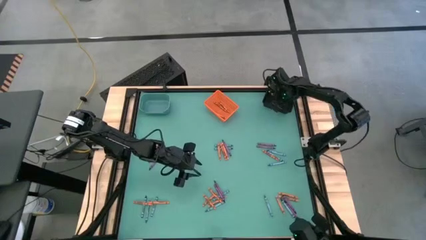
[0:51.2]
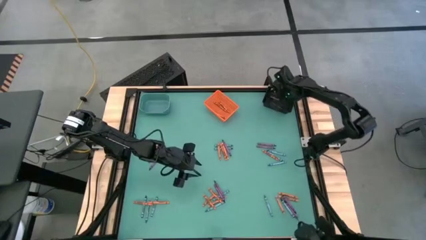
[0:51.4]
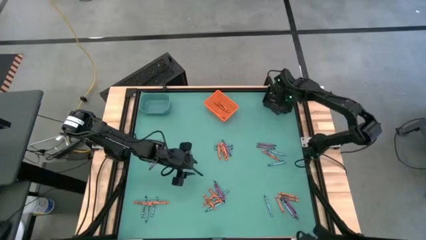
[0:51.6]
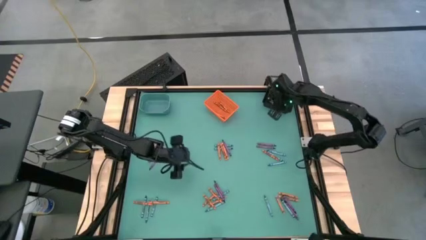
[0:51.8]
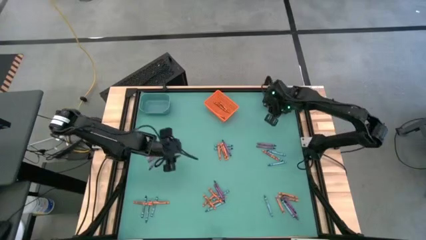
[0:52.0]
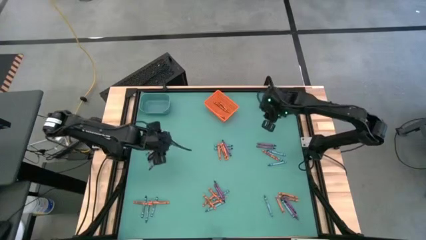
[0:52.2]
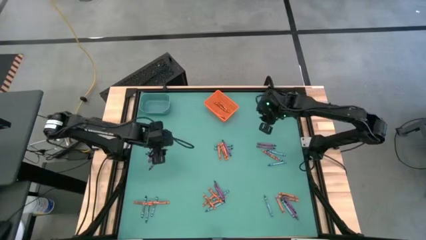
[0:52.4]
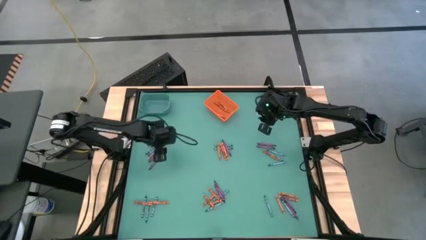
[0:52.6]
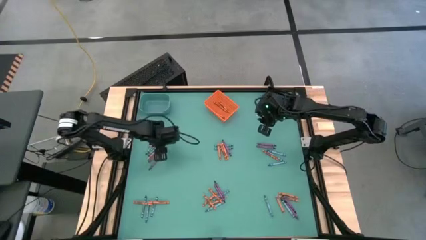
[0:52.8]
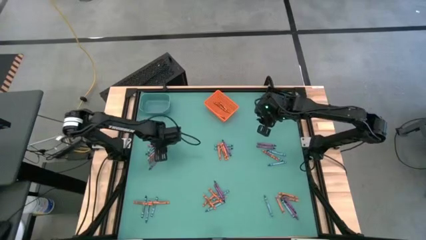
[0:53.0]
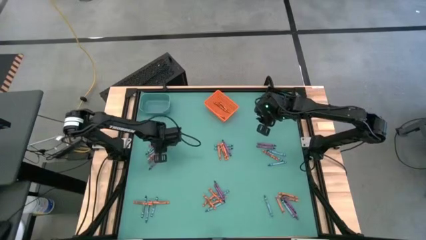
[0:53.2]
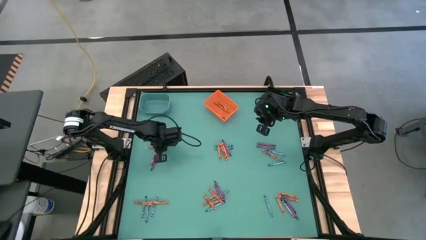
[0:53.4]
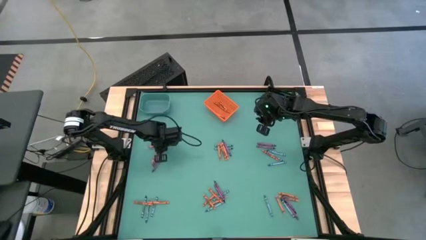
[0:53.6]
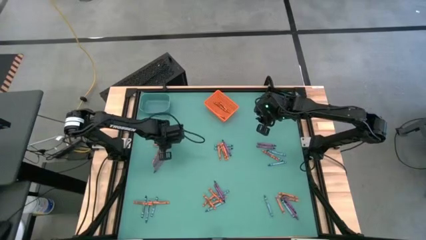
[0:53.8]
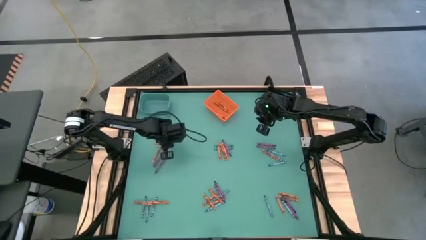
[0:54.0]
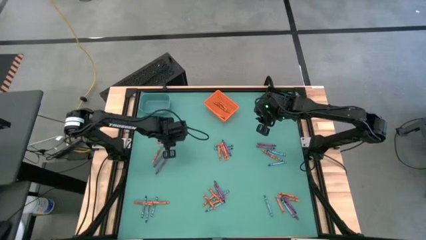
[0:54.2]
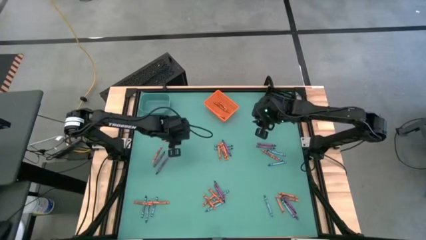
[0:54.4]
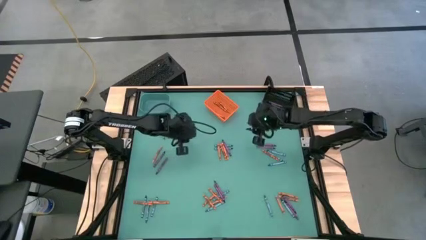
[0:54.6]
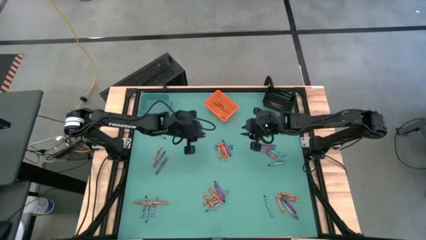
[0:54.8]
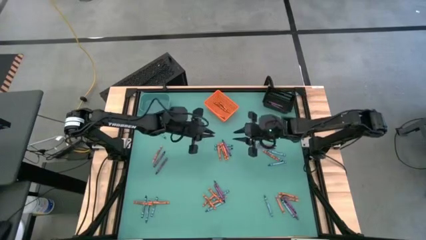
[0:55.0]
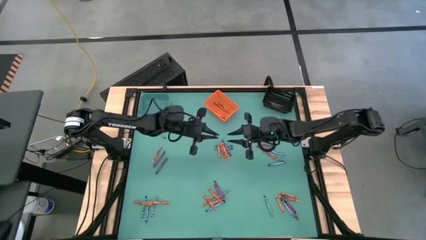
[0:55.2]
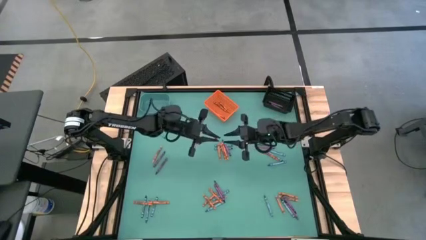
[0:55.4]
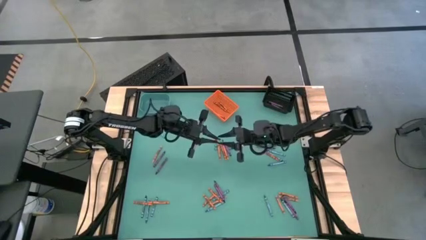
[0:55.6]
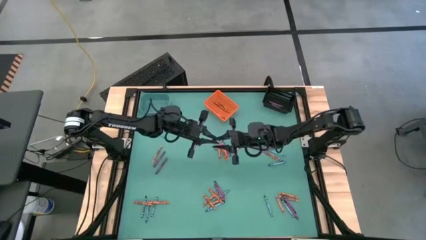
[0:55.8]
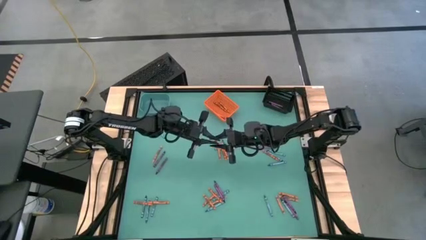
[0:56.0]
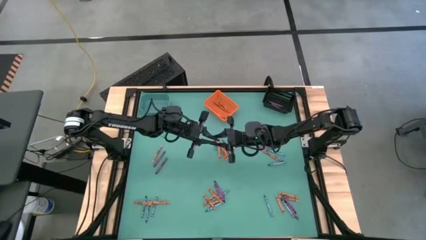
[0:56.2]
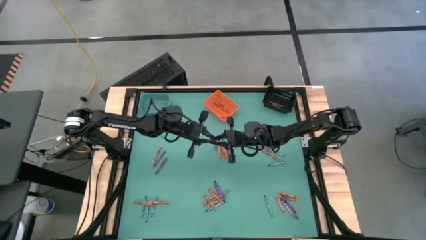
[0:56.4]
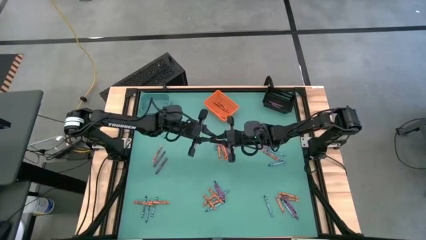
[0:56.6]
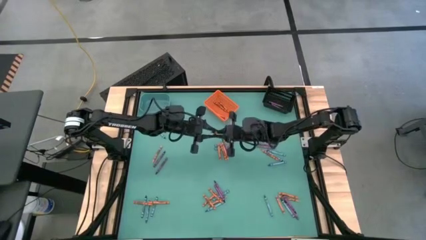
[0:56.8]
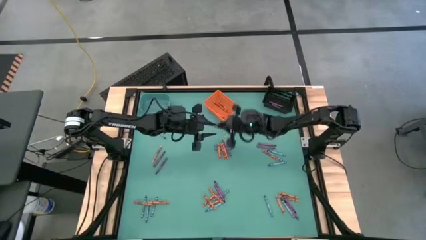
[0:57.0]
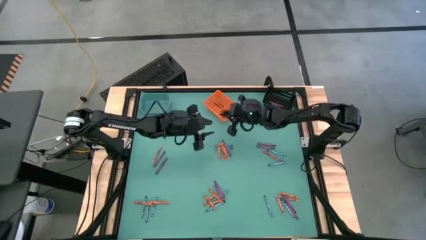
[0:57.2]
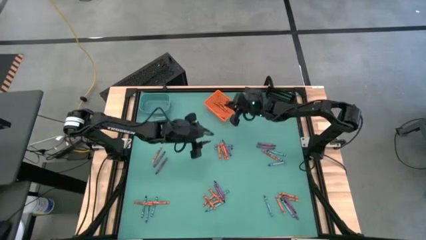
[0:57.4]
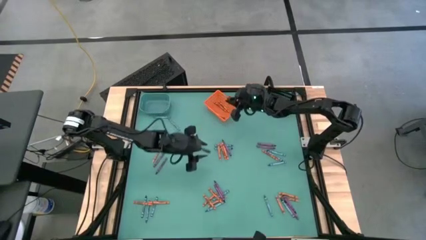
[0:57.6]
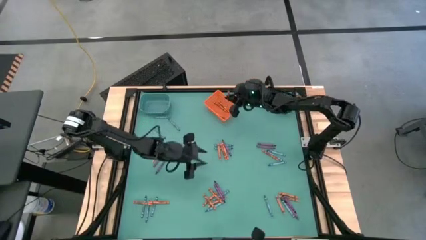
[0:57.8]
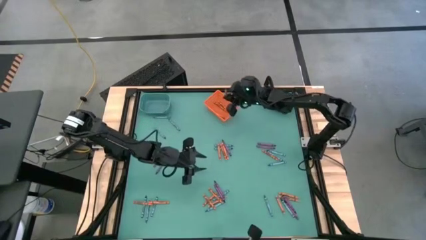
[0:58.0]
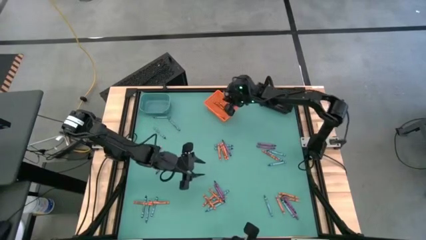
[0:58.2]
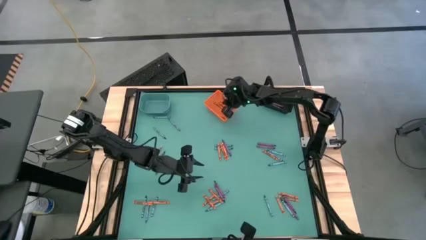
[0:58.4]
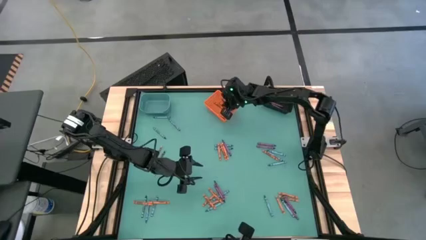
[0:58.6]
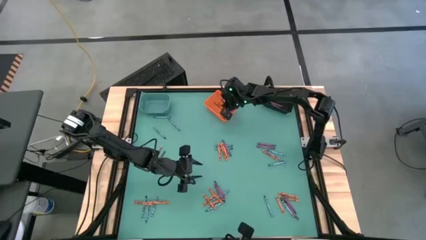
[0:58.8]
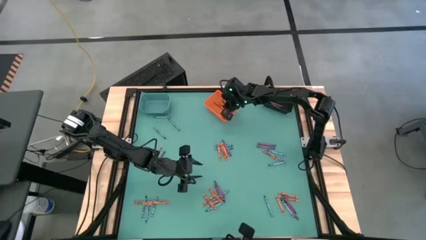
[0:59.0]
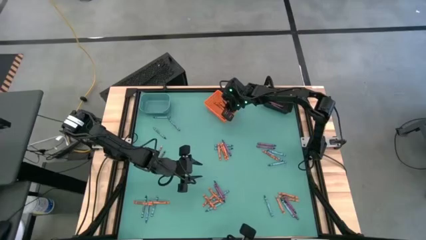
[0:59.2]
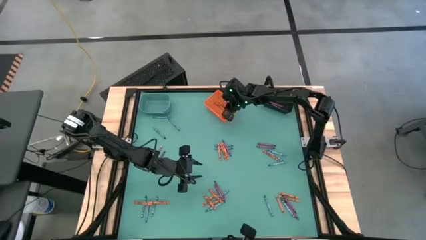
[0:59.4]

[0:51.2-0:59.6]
Task: Sort crayons
Put the orange crayon into the orange bin

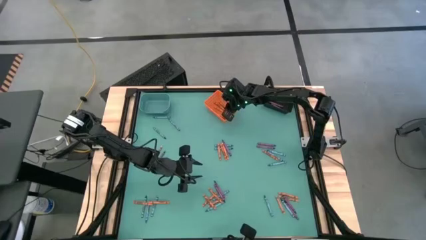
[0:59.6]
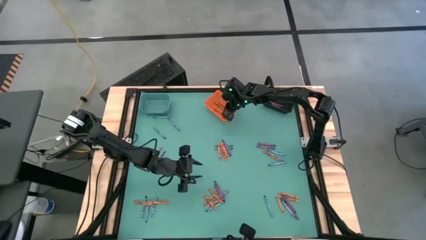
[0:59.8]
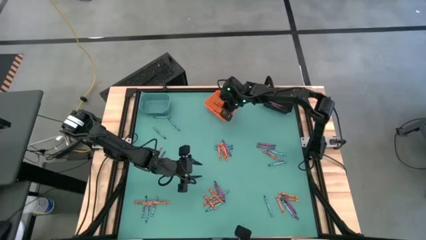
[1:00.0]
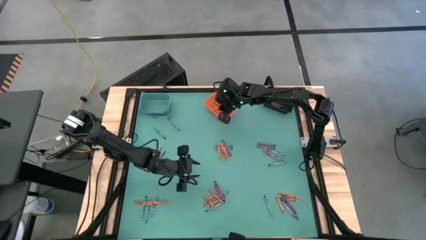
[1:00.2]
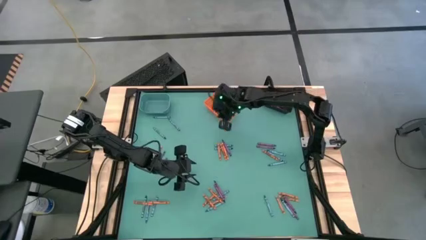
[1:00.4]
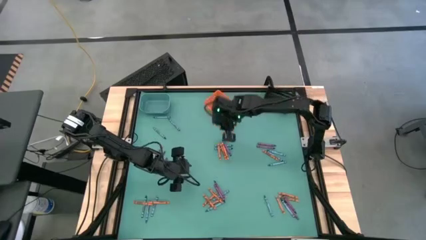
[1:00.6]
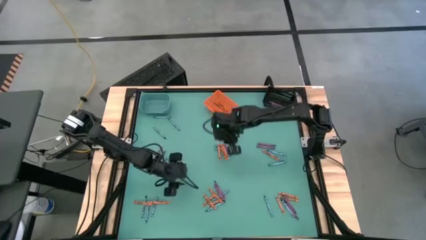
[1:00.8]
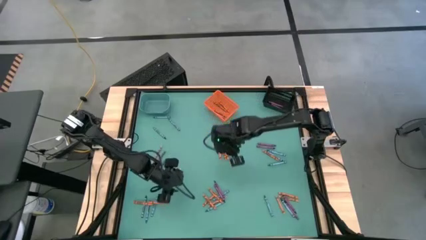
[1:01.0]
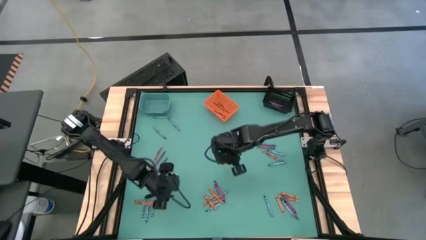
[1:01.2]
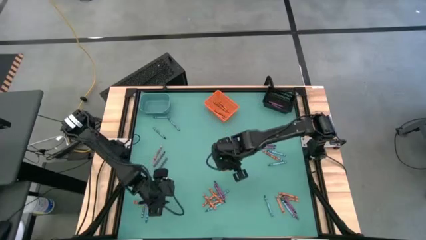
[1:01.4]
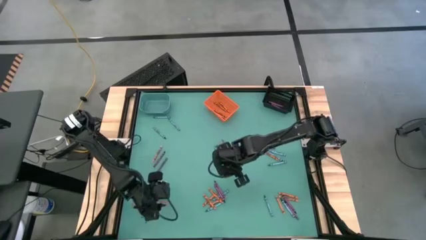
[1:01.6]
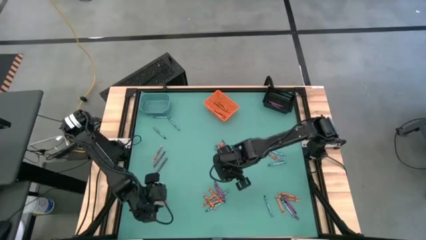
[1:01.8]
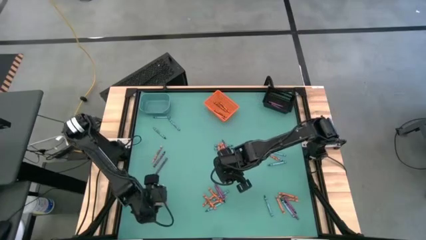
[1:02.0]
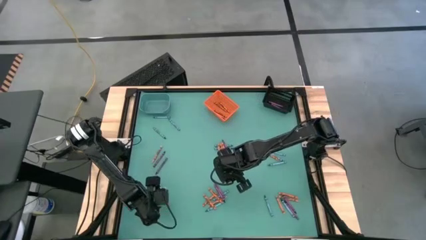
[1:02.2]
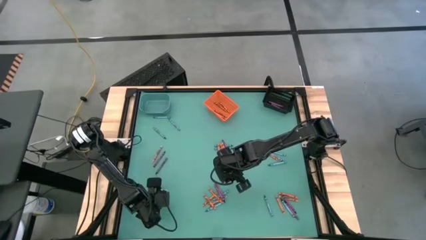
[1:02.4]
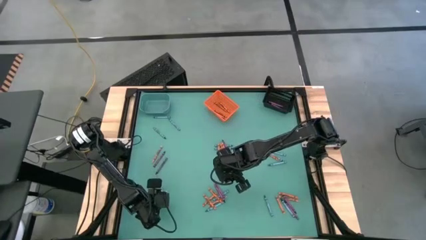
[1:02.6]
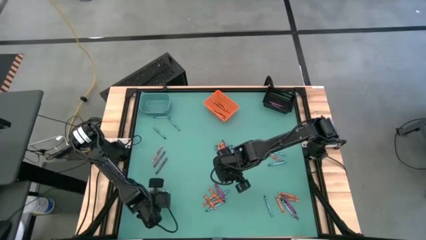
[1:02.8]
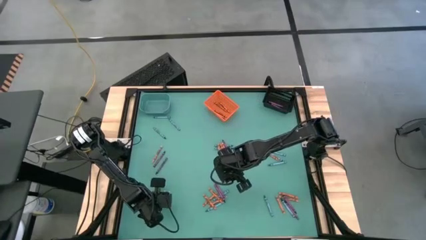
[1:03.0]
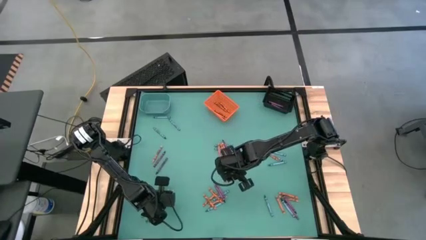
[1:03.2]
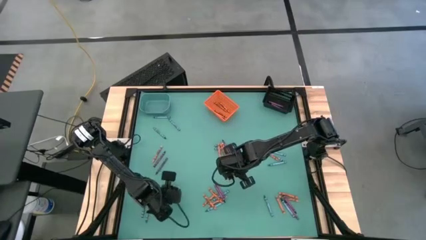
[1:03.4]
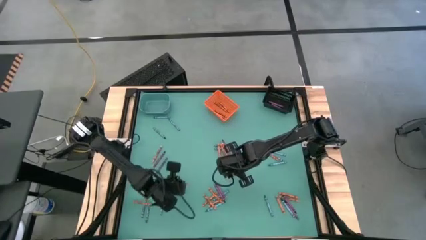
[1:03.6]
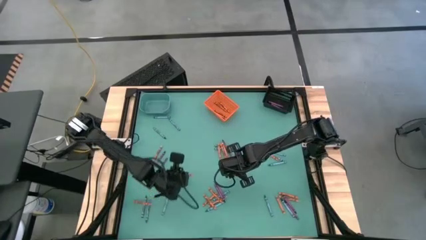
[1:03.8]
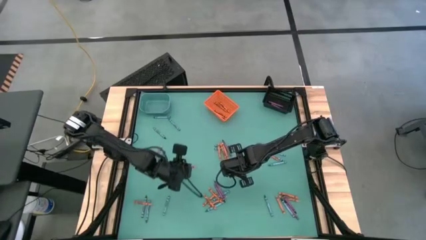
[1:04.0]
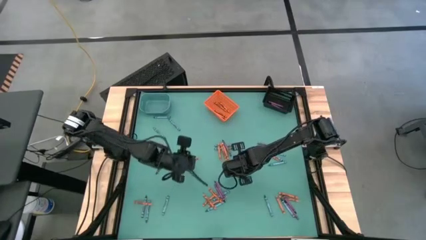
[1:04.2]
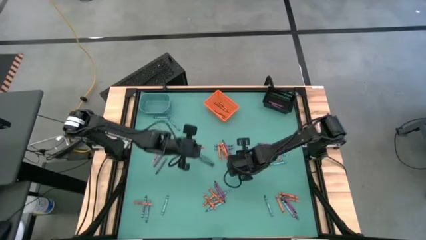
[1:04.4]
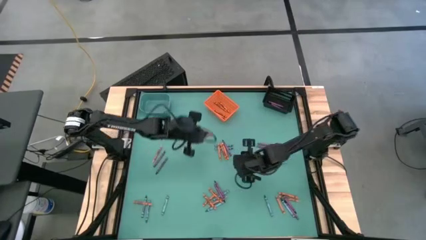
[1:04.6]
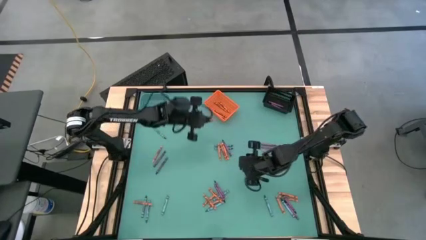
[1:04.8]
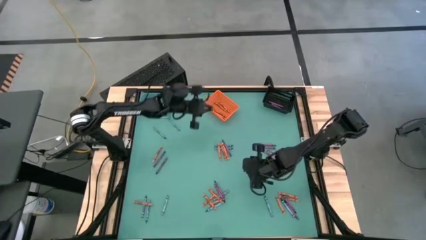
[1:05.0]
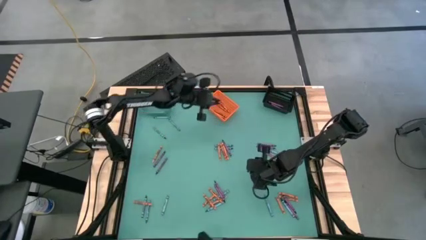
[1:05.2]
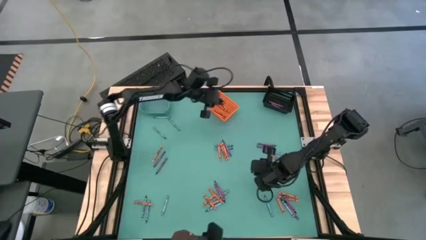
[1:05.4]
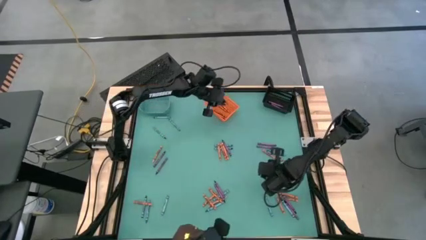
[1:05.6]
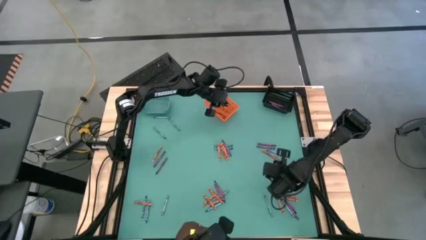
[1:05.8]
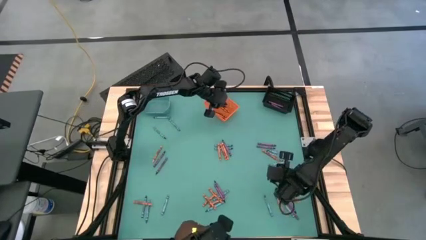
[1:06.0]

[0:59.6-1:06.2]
Put the orange crayon into the orange bin

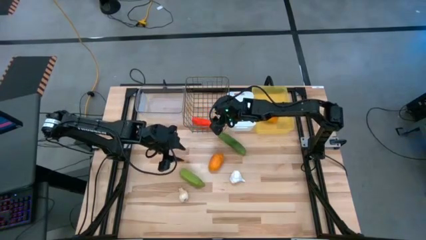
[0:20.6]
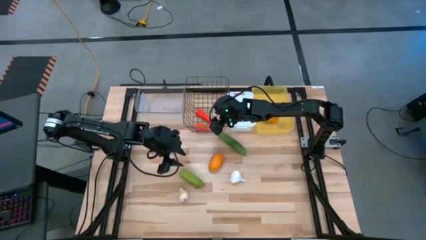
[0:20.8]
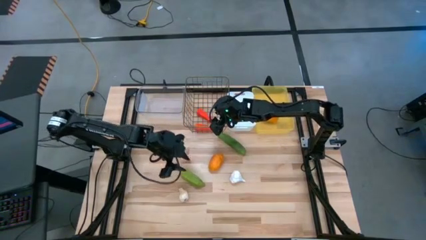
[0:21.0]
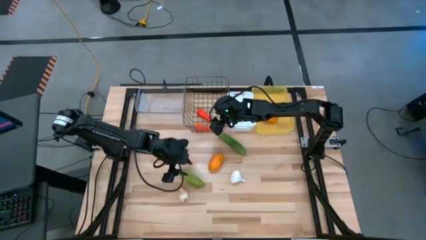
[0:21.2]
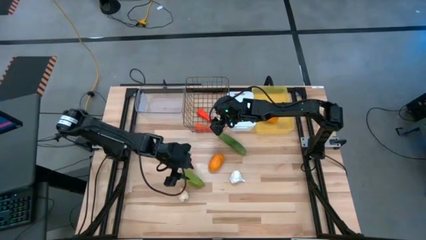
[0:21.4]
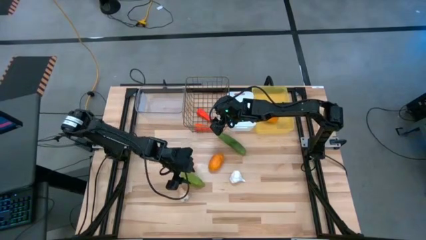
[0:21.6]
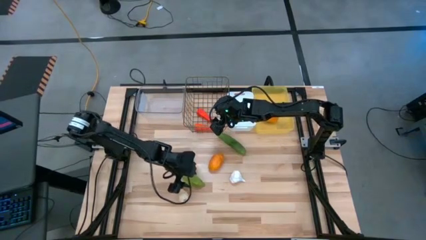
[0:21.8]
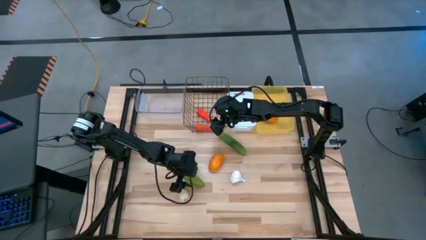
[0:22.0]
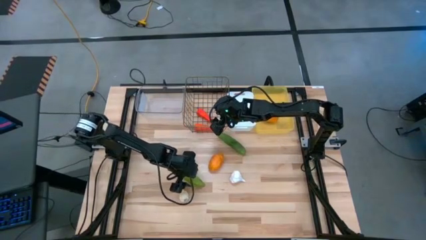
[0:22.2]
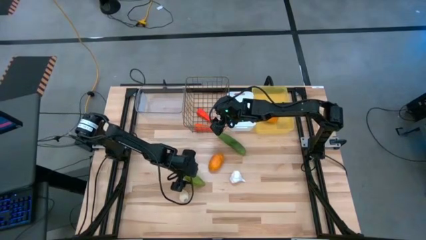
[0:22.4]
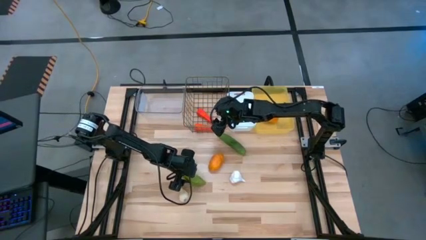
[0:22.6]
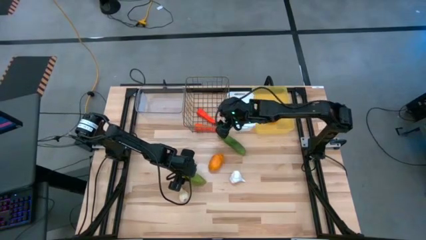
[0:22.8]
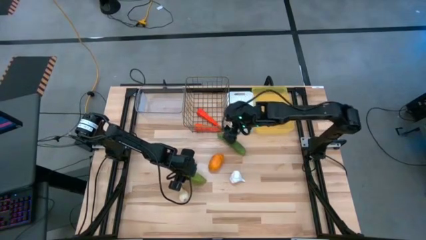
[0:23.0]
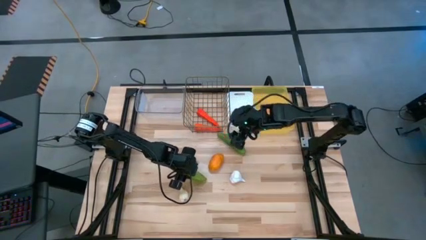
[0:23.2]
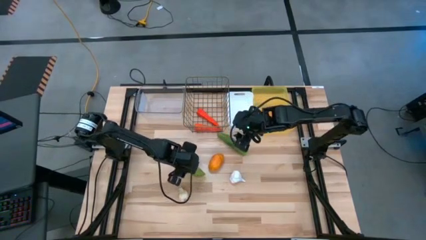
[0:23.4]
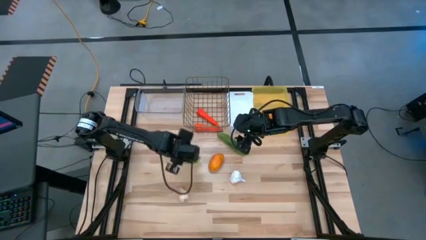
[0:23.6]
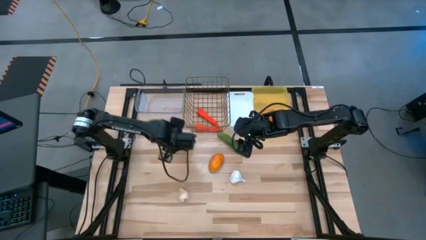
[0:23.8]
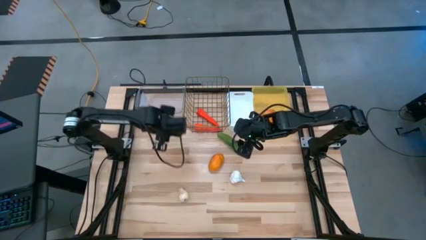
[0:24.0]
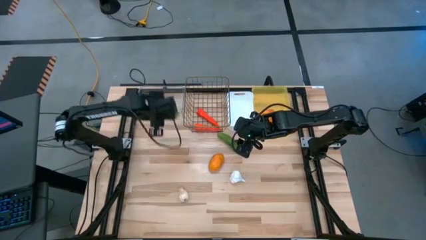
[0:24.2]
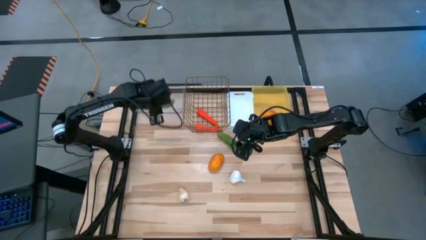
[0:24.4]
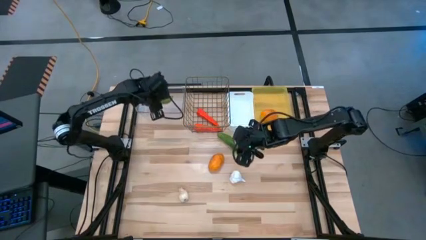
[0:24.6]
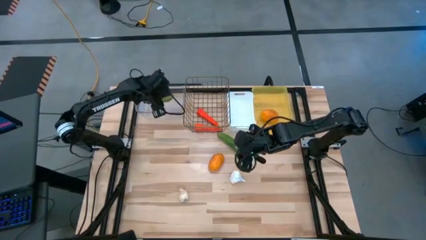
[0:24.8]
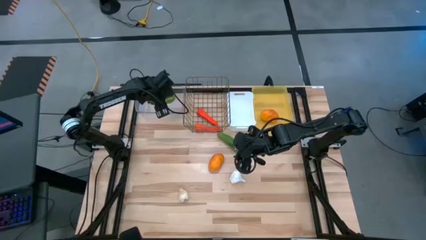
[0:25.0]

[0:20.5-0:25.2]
Task: Sort produce into baskets
Put the bottom cucumber into the transparent bin
